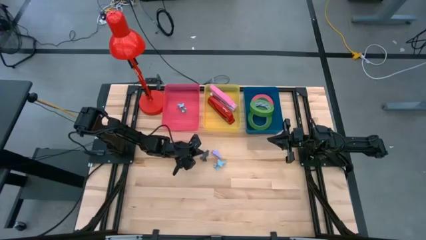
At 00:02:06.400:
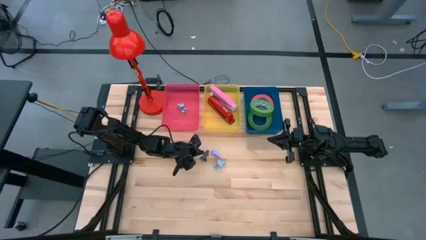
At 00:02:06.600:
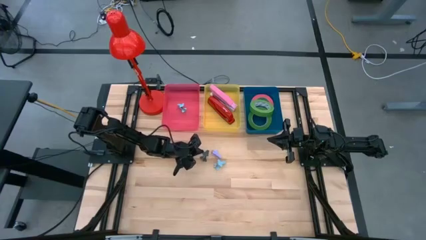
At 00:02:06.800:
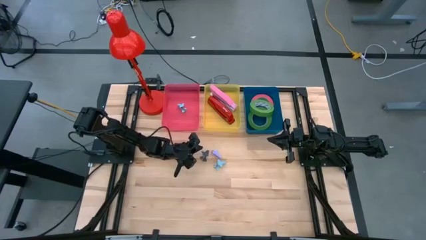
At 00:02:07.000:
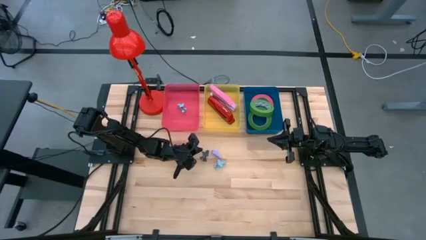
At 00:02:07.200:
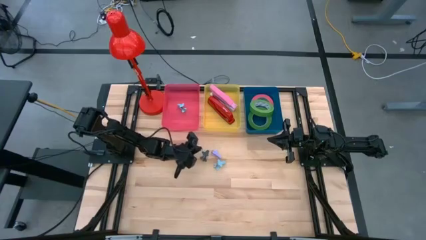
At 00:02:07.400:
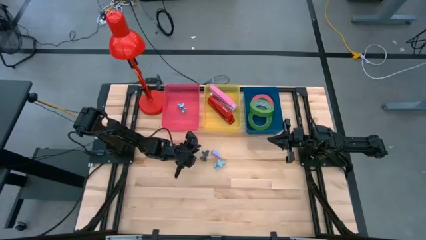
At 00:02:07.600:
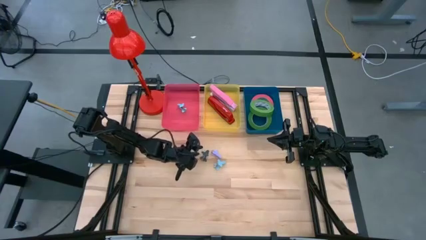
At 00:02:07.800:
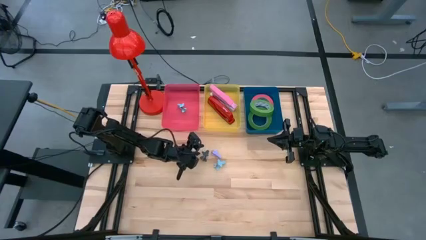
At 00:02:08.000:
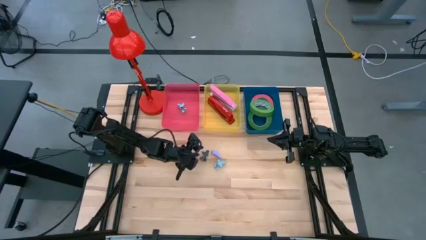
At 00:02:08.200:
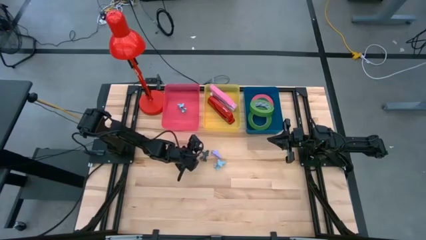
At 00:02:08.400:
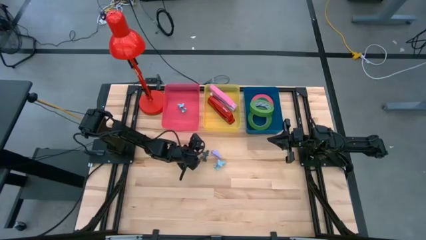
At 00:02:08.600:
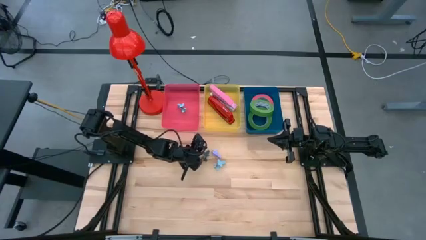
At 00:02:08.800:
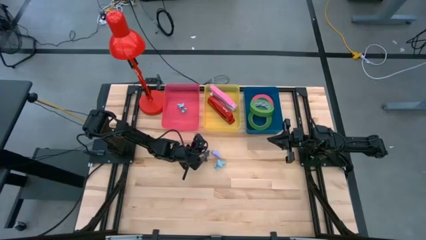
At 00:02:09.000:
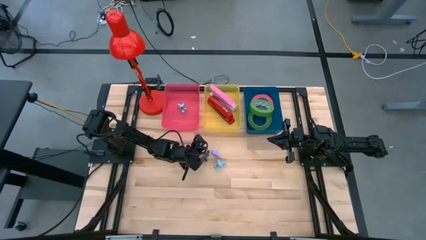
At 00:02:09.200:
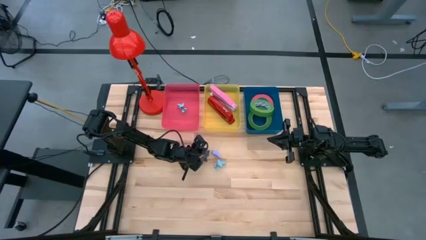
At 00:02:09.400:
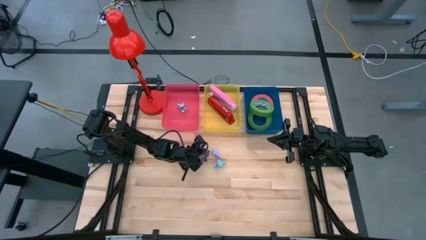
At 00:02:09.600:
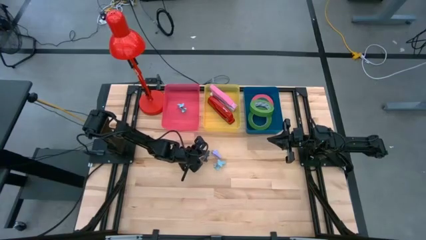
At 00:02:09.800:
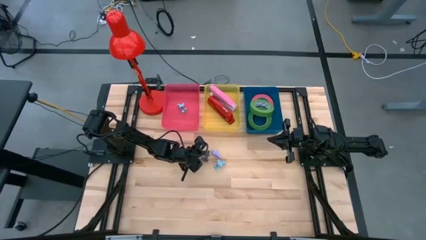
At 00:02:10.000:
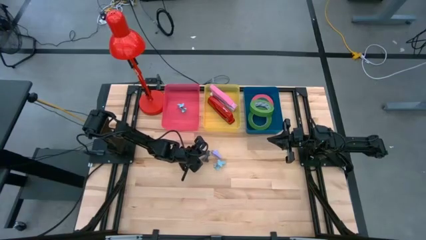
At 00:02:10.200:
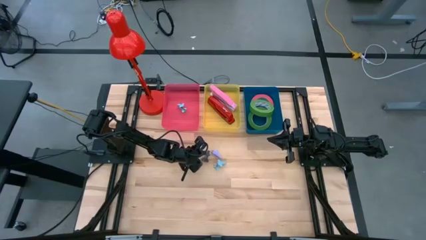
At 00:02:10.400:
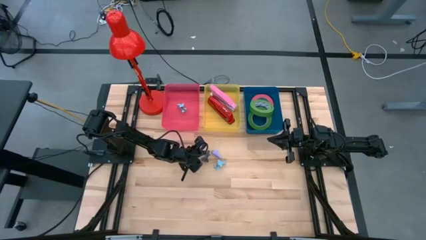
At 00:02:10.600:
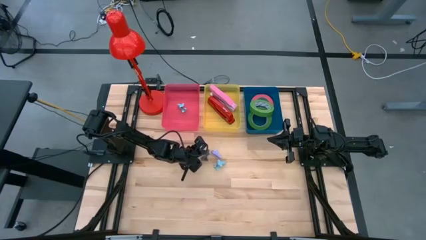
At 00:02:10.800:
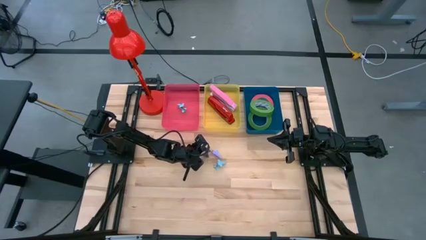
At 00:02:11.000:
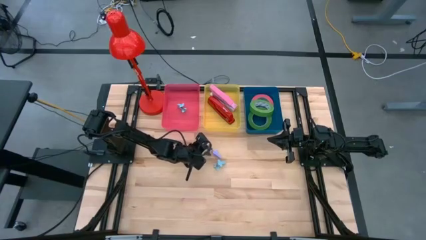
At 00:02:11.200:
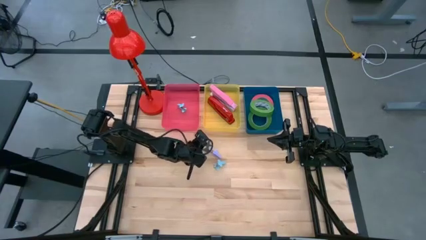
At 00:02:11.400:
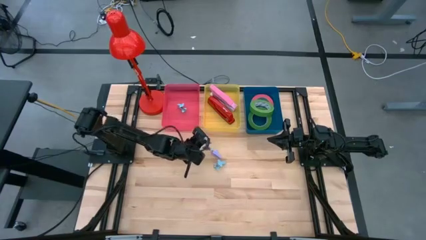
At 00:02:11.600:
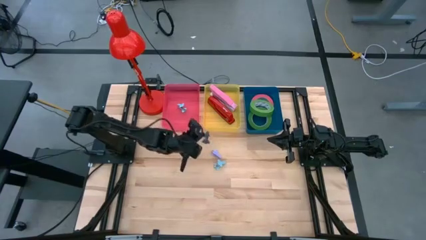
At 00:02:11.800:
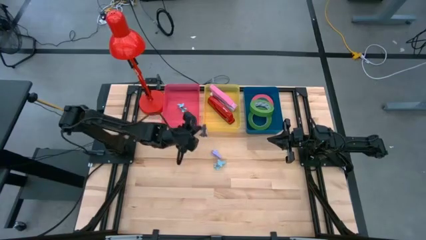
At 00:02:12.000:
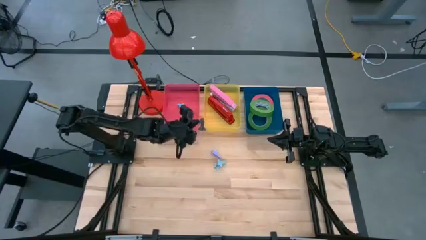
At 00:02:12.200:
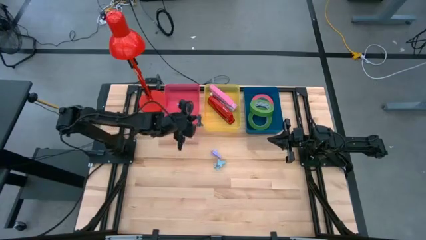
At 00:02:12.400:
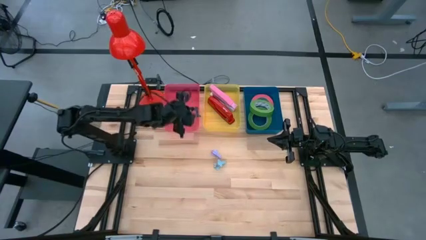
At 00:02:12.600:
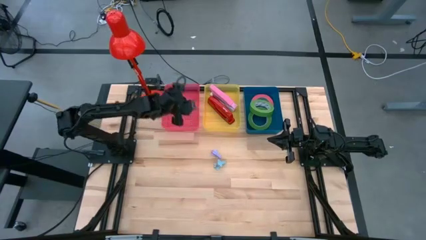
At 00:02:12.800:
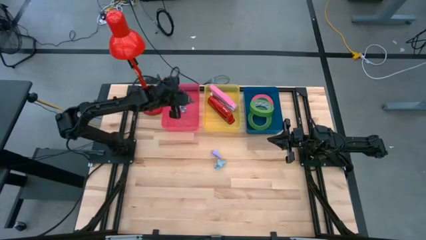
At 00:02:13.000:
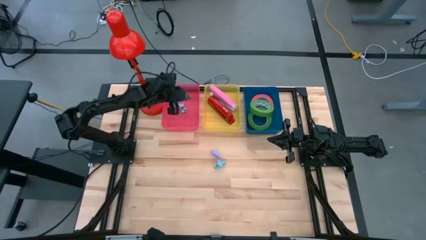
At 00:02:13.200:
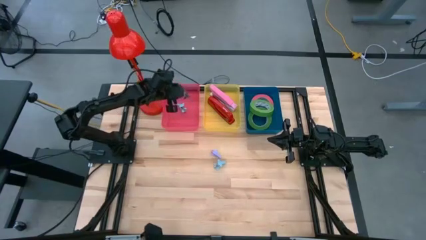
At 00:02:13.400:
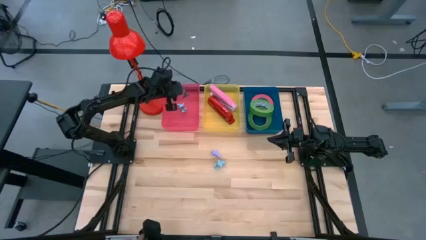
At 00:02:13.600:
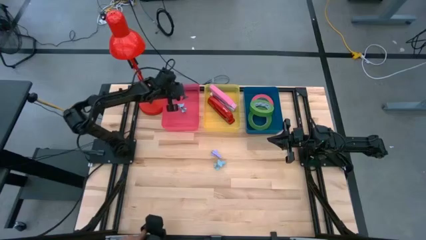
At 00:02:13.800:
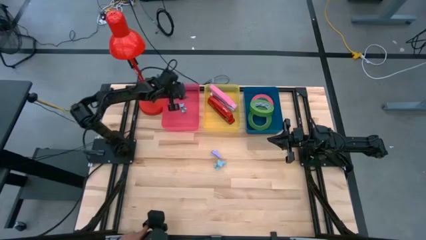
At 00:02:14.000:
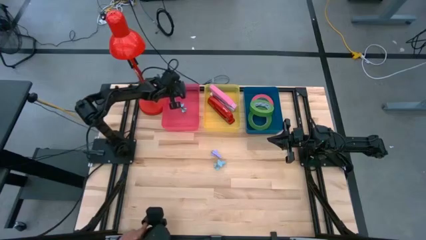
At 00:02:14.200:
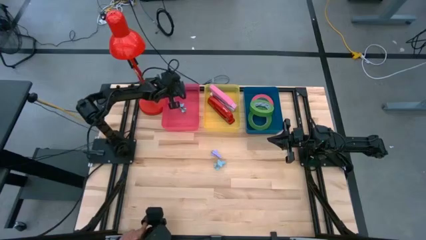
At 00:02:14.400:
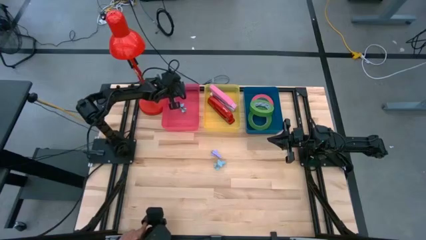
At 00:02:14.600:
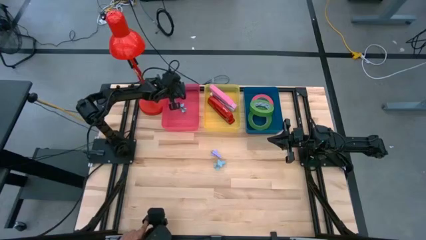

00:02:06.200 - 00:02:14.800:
Task: Pick and place Stapler, Stapler remover, tape
Put the black staple remover into the pink bin

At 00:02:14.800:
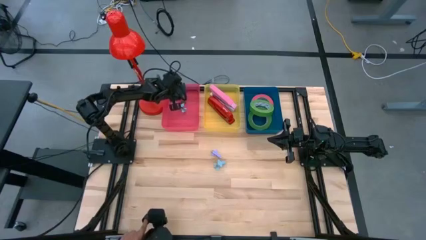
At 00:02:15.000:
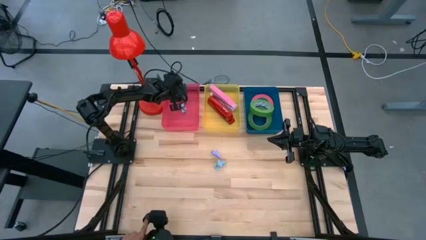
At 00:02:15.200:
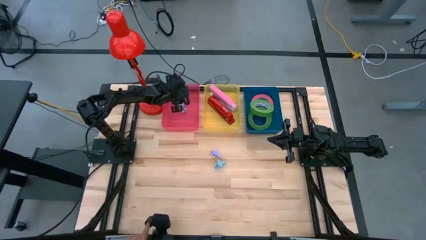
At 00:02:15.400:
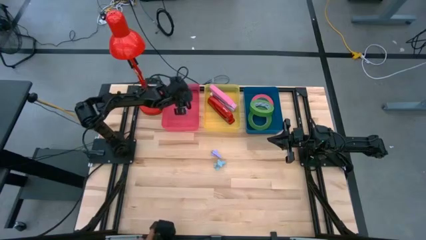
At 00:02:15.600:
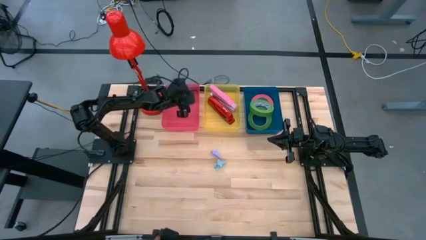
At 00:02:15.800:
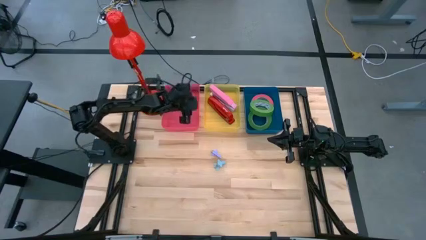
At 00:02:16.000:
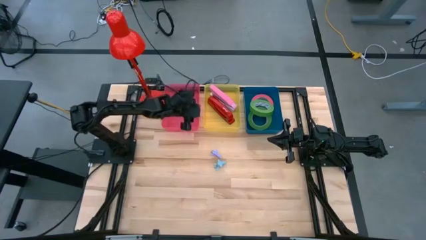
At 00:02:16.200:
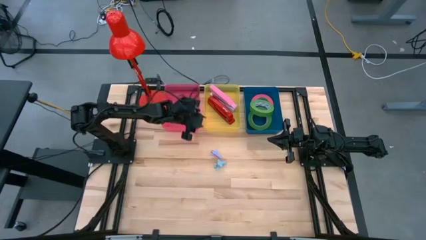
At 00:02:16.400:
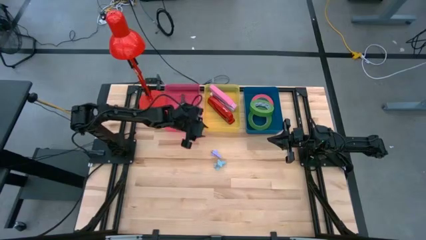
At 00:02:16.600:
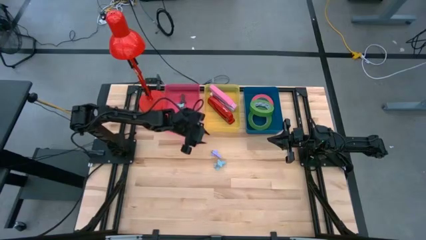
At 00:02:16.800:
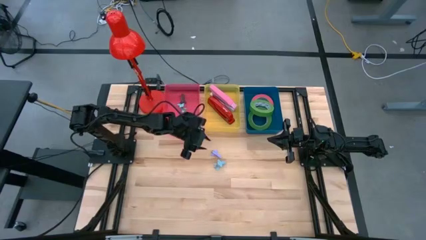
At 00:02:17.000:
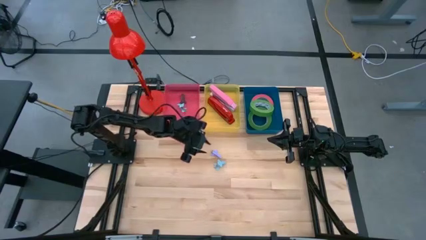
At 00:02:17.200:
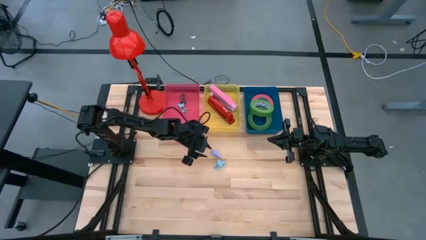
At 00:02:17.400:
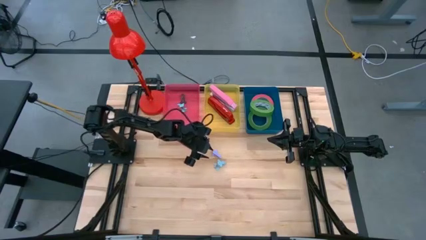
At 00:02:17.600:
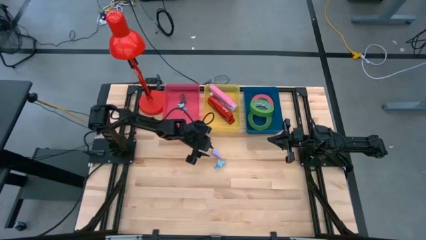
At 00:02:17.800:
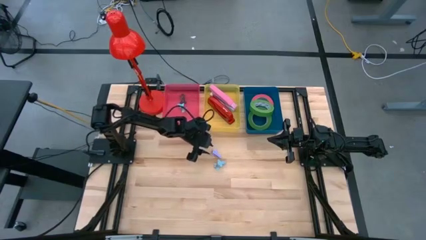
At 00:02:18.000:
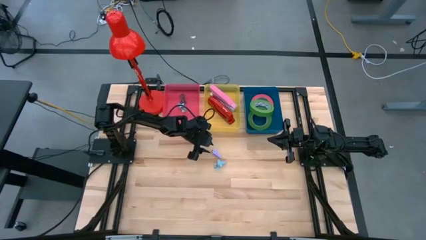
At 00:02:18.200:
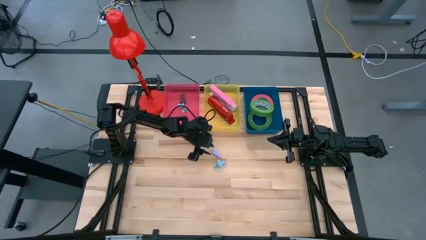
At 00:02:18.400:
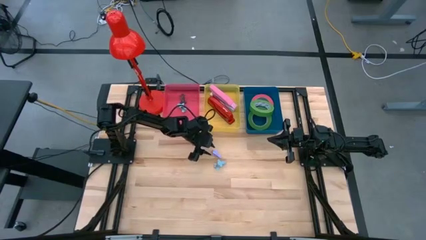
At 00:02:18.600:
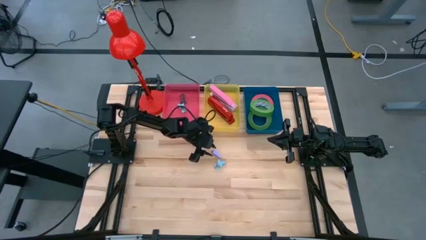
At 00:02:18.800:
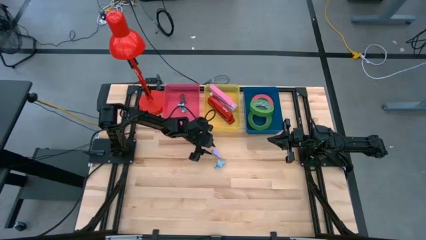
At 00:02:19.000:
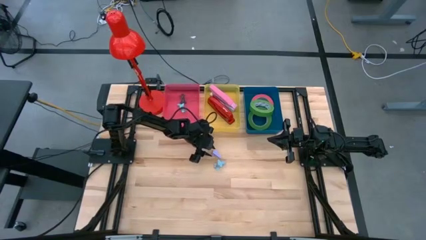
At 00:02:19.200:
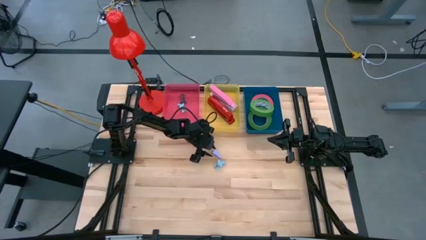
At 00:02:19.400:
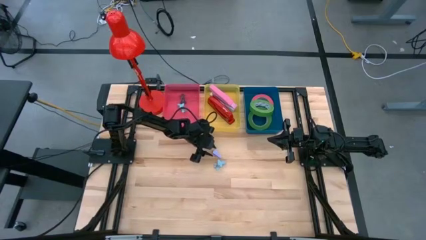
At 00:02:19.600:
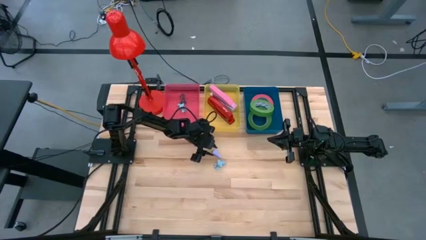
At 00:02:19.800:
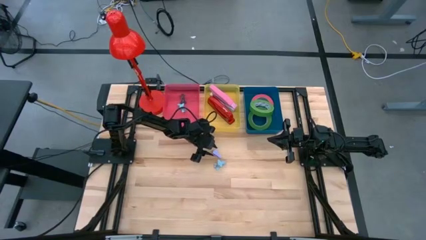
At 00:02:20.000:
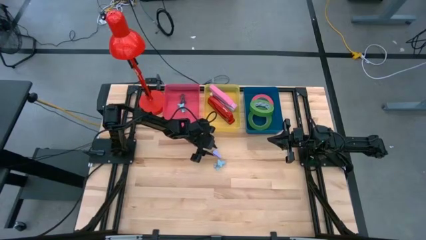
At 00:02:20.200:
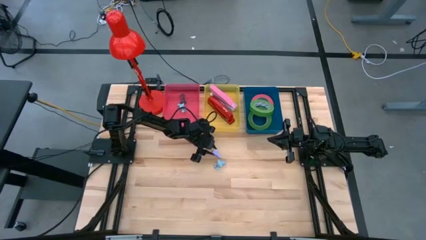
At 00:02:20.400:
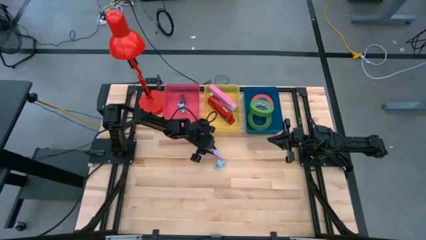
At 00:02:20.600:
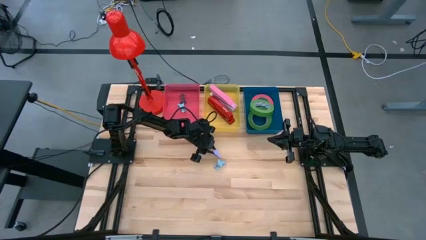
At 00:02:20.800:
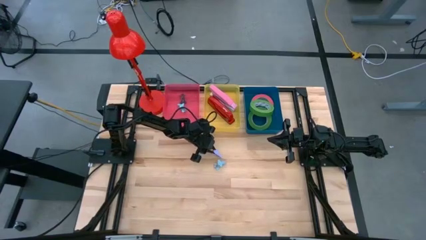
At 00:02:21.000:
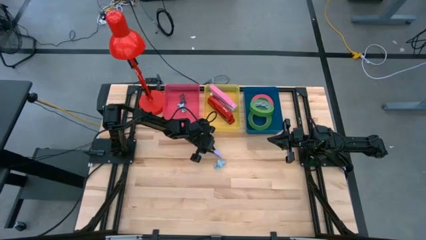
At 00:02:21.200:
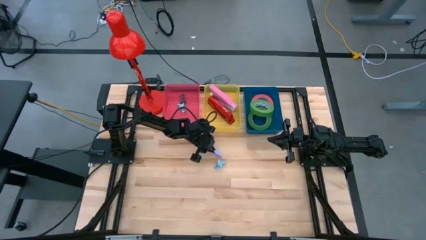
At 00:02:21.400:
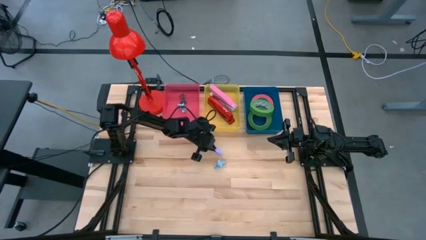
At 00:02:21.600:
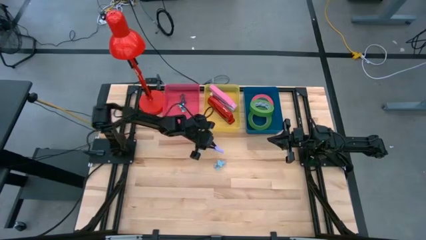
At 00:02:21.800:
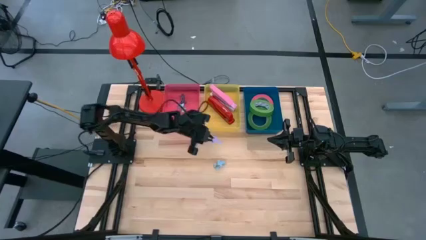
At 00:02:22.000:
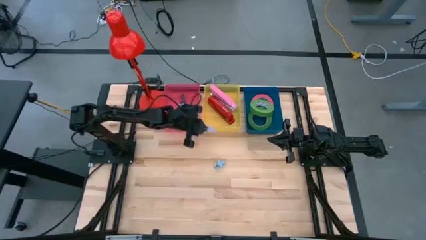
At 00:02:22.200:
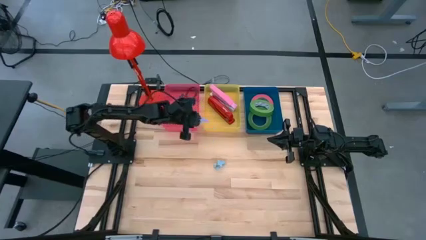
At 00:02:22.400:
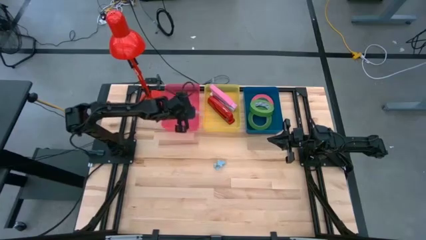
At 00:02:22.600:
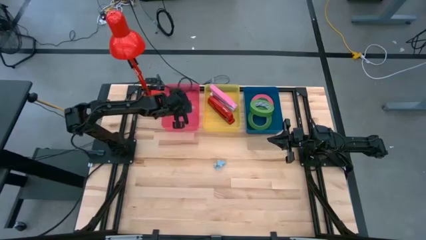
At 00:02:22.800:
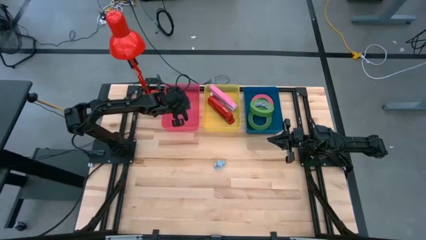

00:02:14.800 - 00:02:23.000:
Put the purple staple remover into the pink bin
